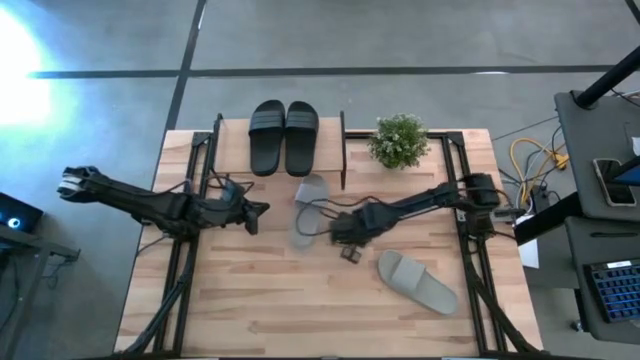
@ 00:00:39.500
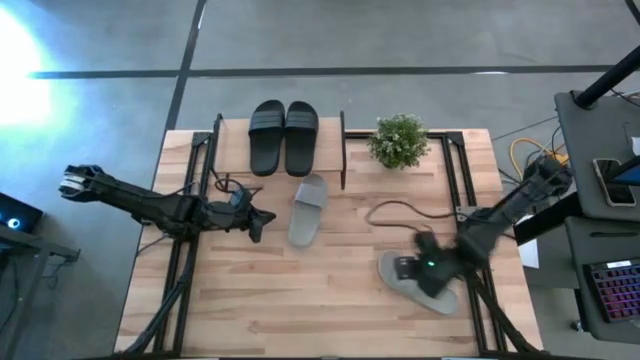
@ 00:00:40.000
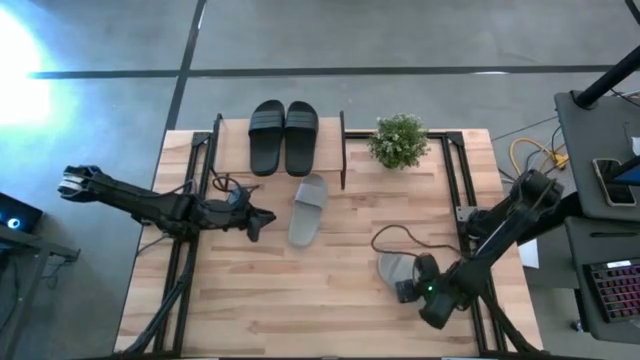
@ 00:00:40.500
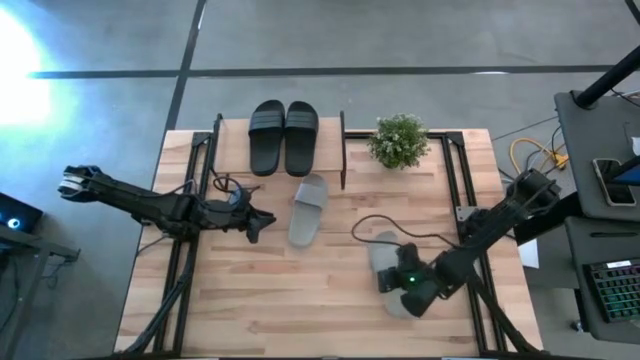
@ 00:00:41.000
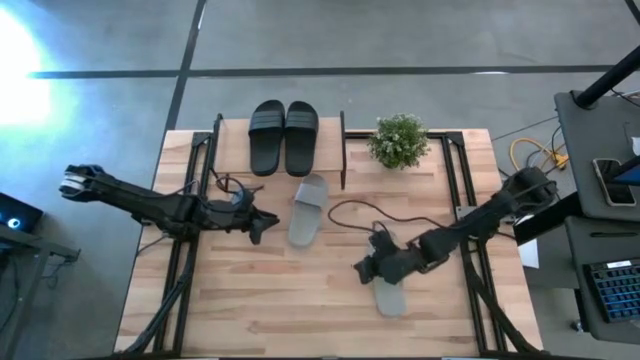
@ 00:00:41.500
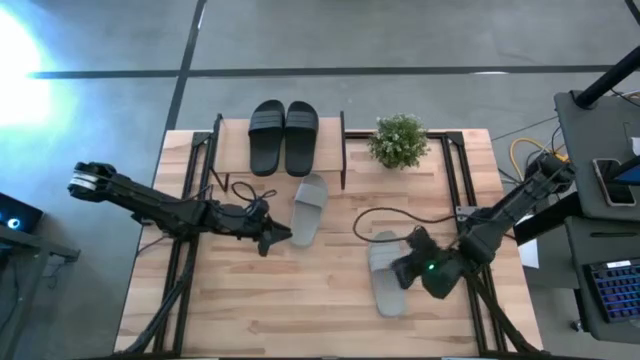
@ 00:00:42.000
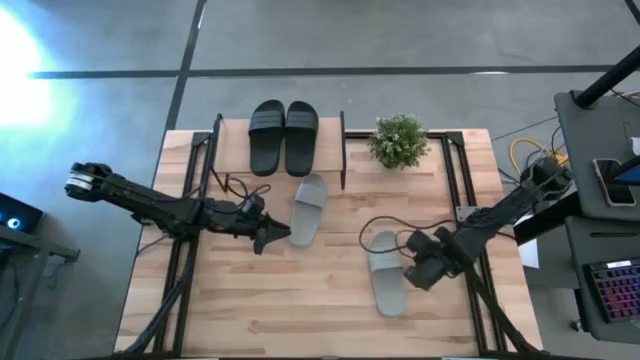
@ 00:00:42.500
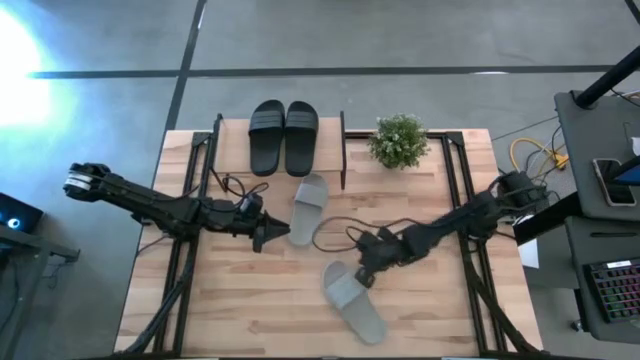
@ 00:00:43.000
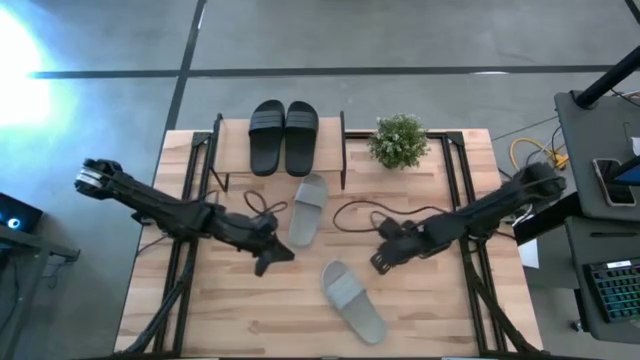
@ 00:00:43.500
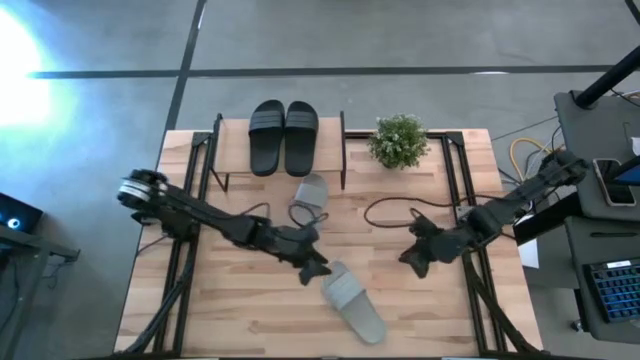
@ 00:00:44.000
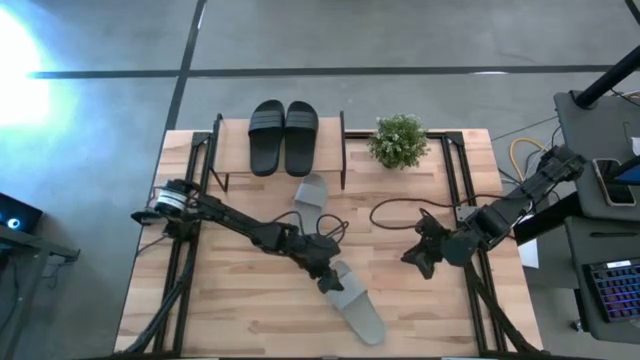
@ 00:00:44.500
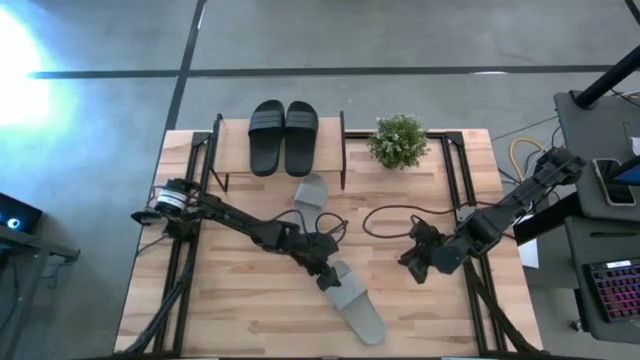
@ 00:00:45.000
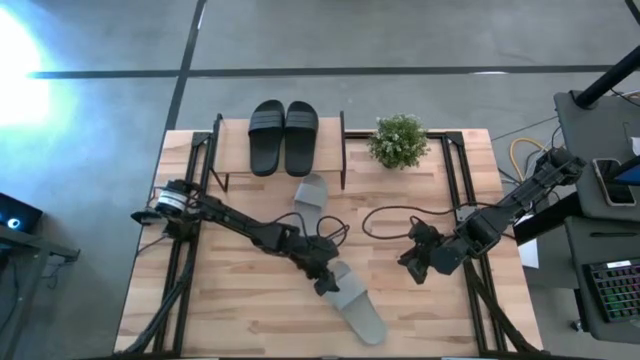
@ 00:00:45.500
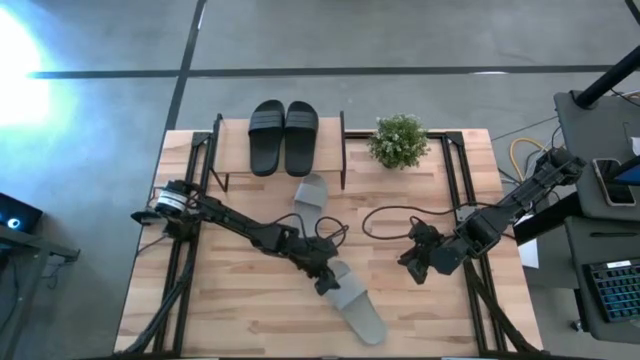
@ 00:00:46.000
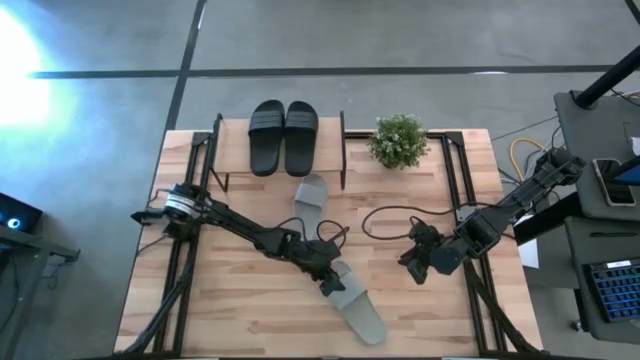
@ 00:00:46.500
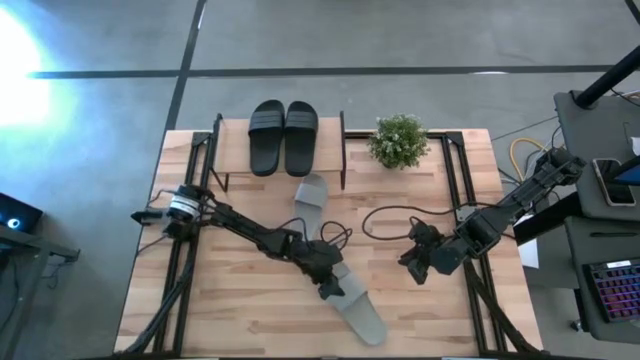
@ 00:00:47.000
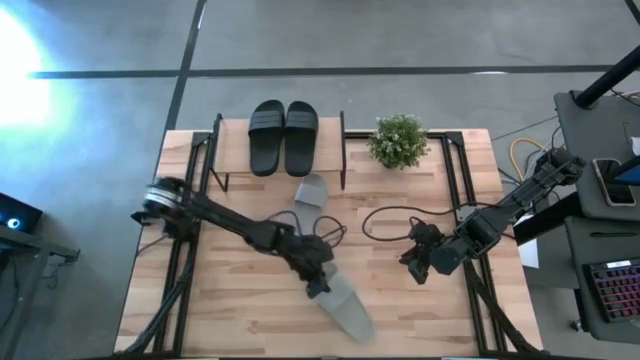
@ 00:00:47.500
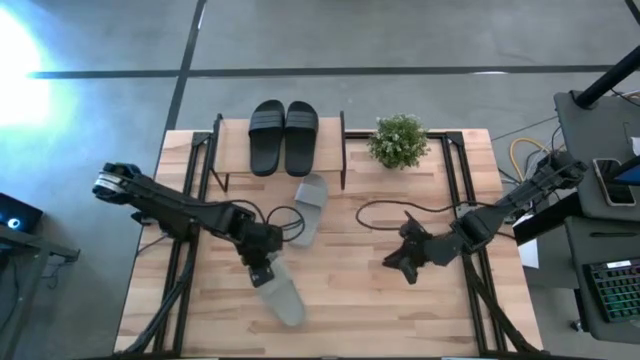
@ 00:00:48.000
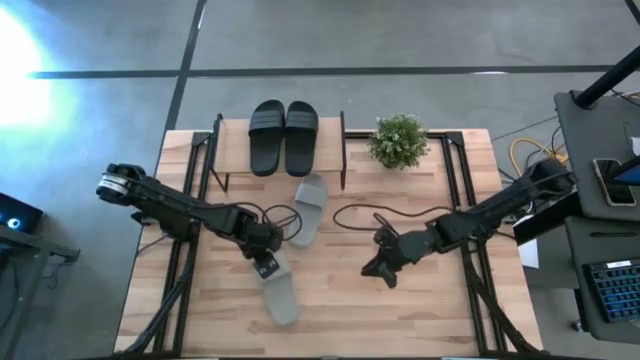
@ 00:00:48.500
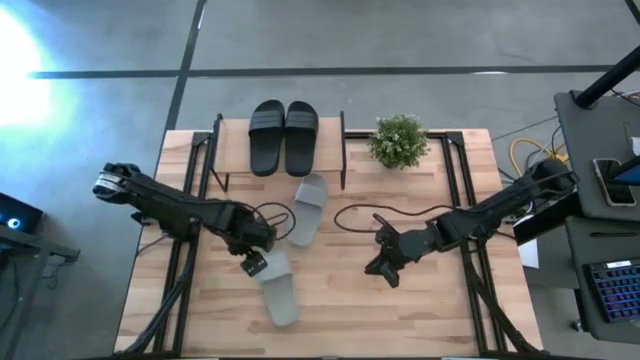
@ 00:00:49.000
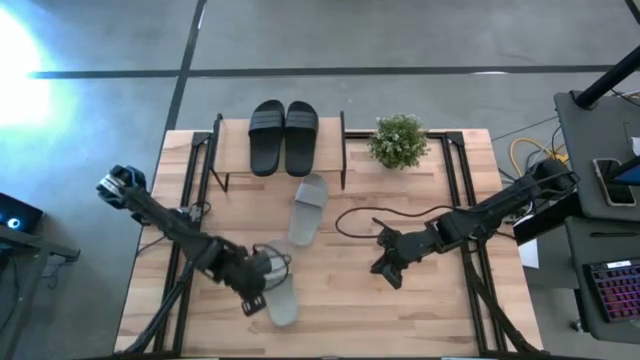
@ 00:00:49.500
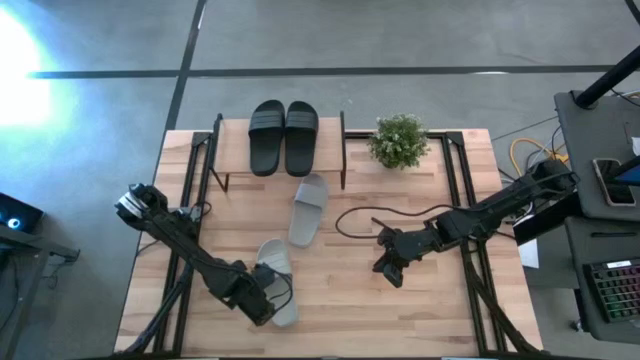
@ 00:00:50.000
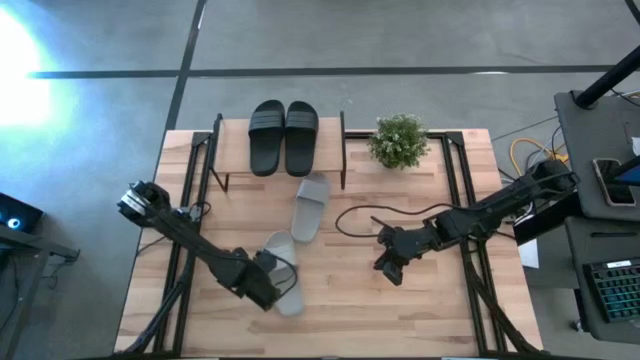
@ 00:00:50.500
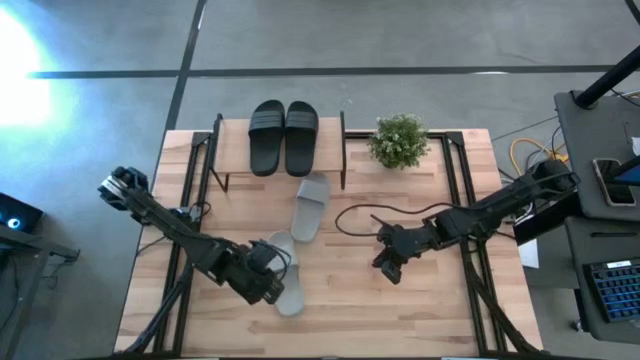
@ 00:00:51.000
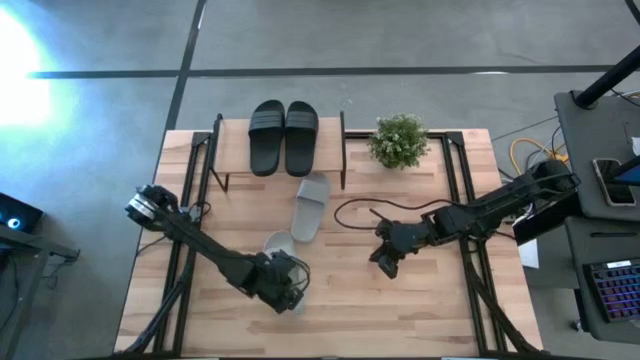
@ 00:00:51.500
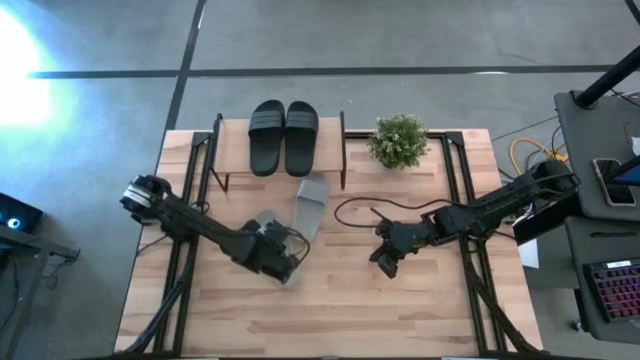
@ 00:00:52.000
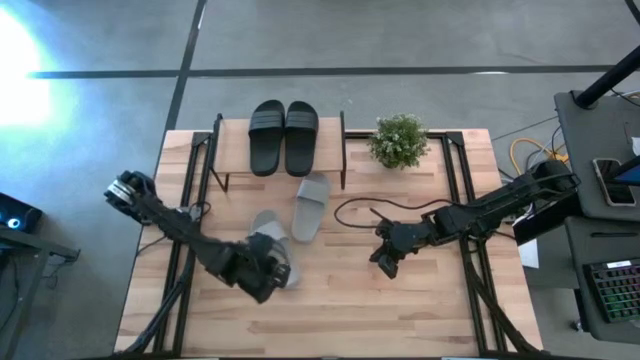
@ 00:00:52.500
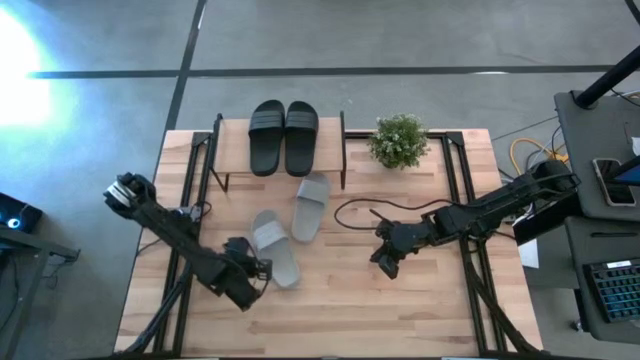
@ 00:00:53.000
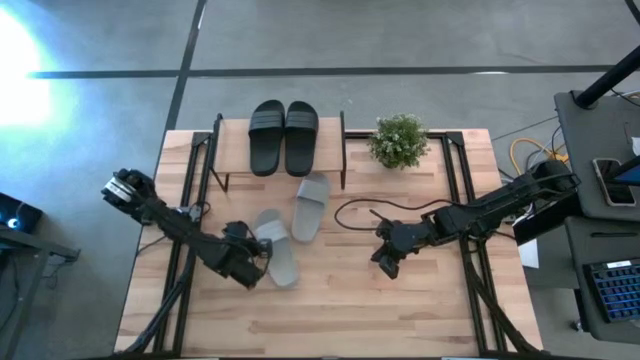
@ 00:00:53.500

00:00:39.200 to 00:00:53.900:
Task: Pick and place slides into the shelf
Put the left grey slipper under the shelf

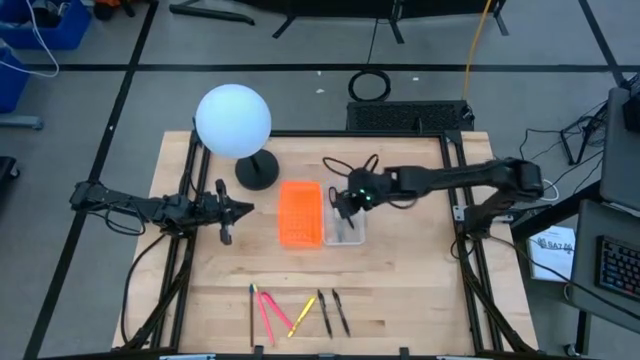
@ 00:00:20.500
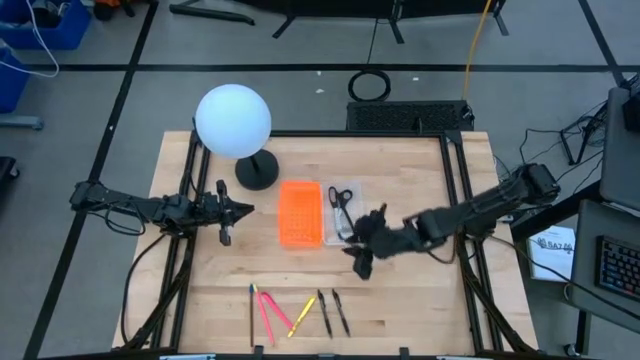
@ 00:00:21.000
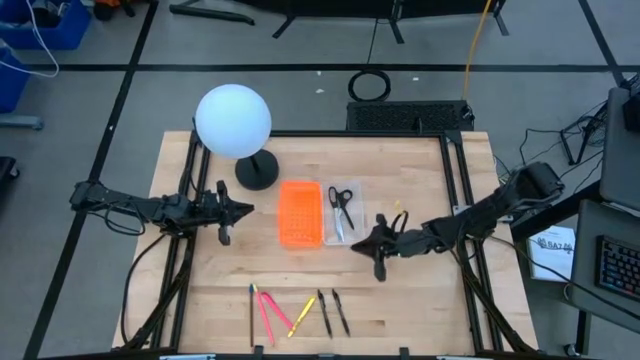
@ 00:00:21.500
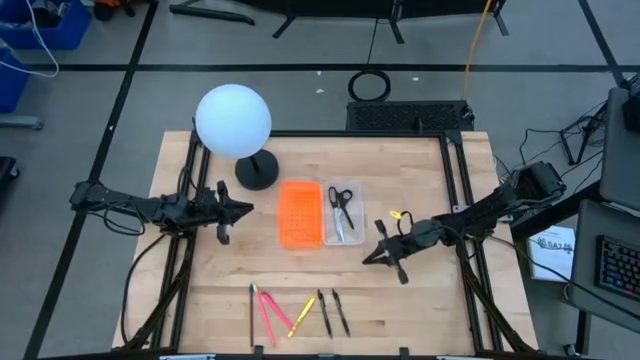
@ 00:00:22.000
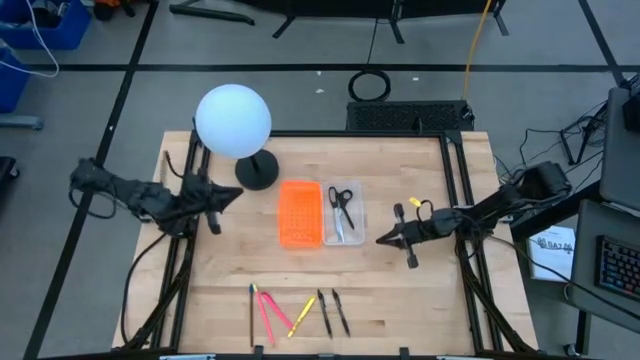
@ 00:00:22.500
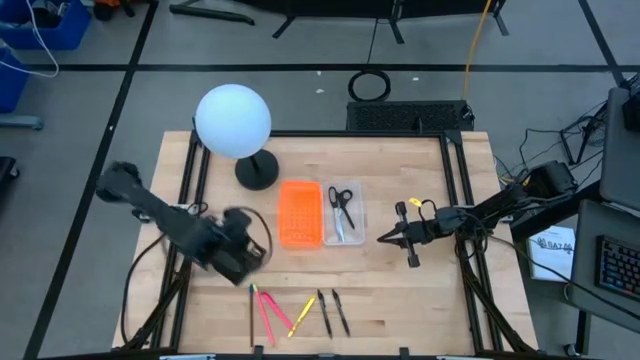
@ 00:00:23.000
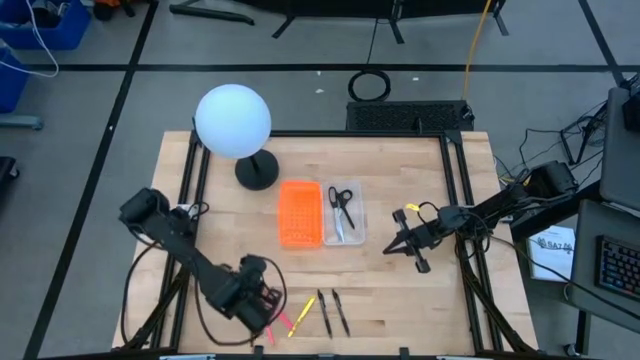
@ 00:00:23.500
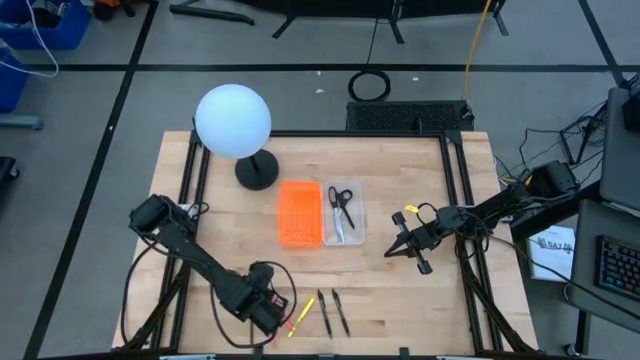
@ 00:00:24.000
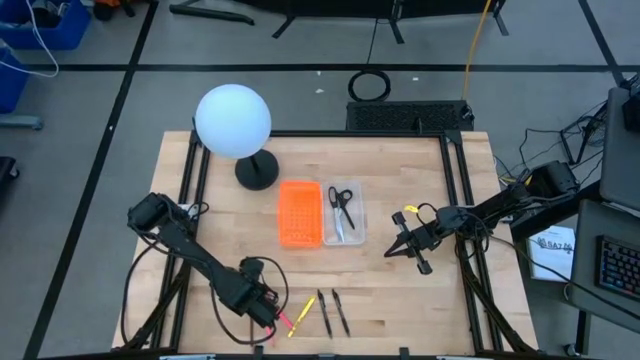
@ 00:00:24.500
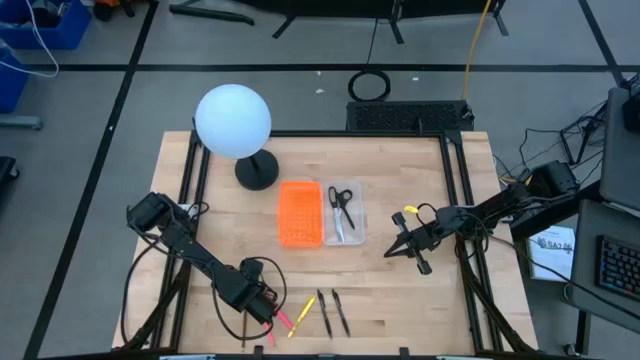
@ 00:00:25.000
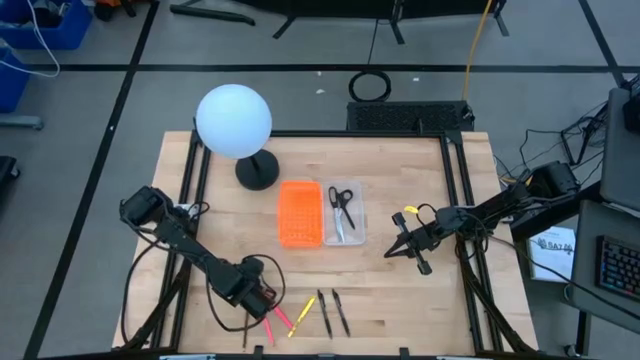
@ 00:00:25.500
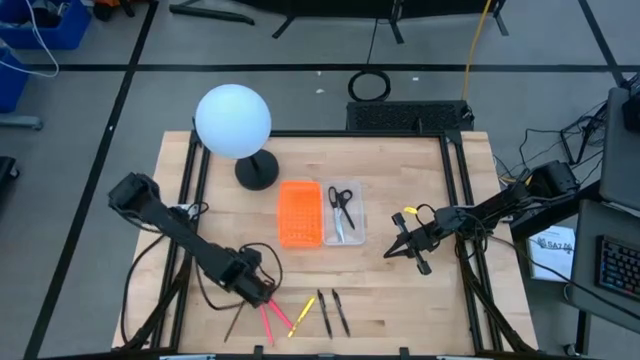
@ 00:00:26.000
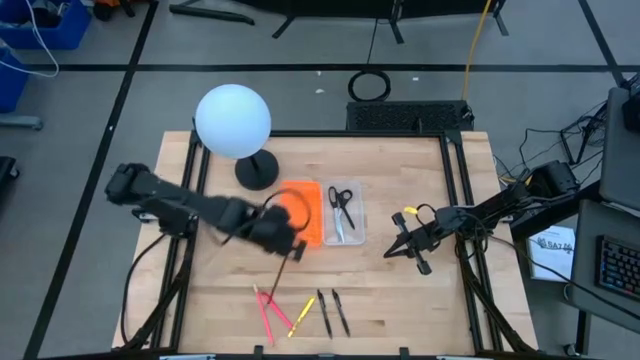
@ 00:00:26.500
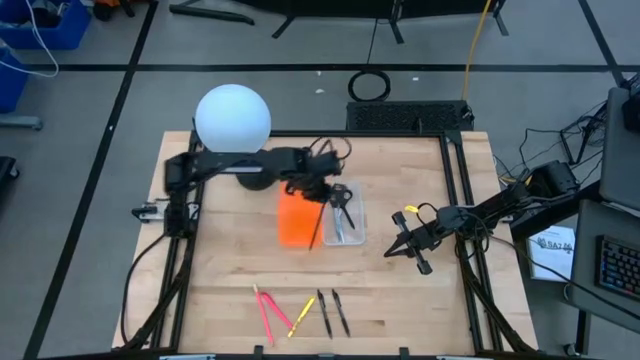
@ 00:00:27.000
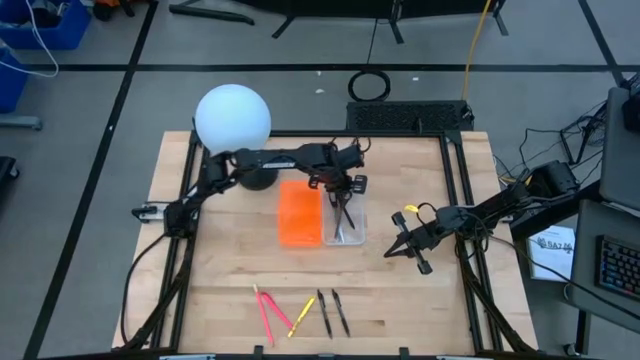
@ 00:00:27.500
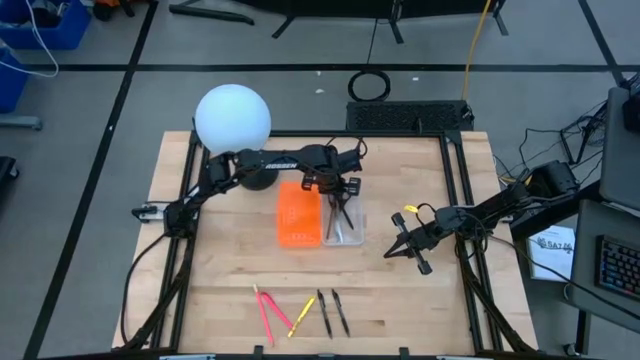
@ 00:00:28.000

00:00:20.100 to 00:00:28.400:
Task: Pick & place school supplies into a supply box
Put the brown pencil into the orange supply box
